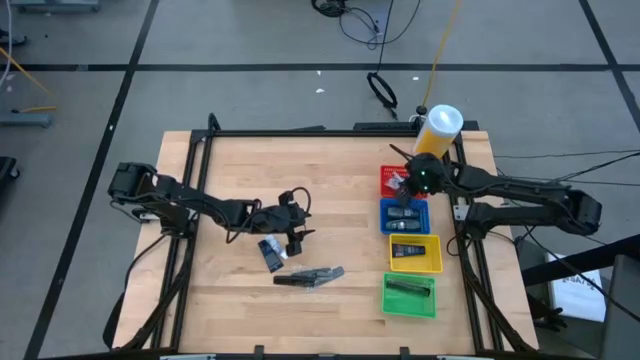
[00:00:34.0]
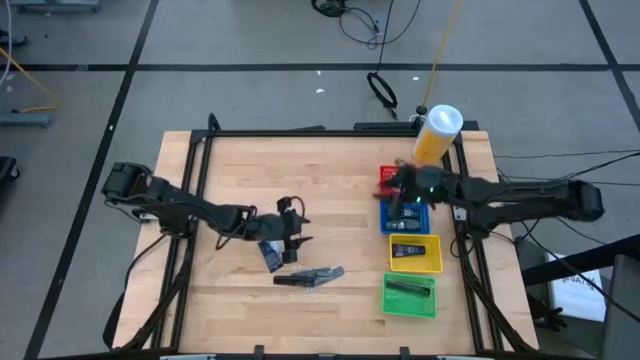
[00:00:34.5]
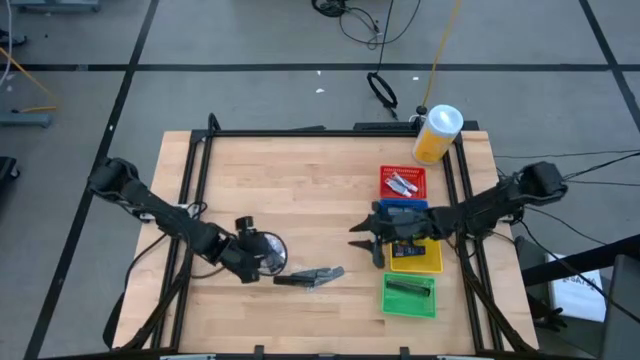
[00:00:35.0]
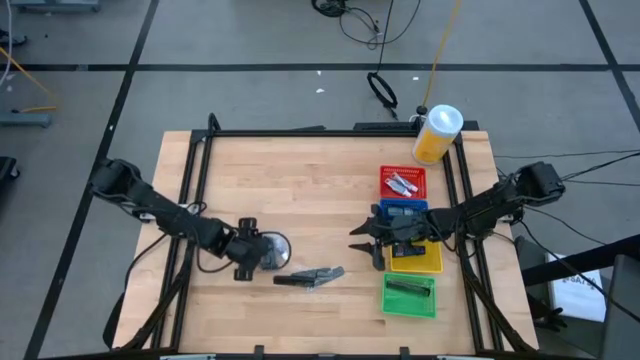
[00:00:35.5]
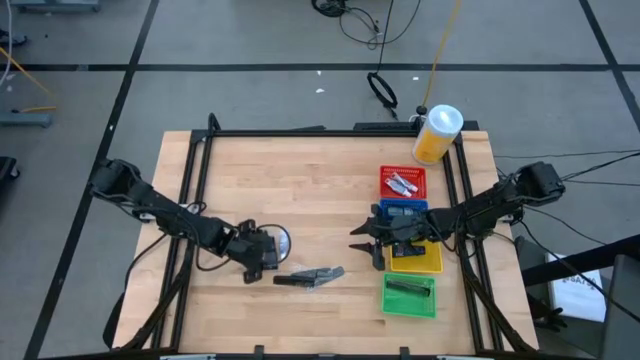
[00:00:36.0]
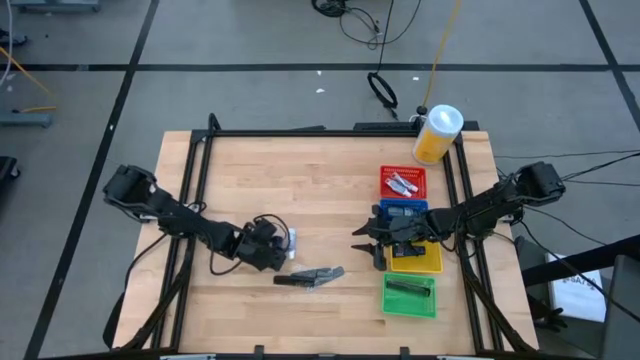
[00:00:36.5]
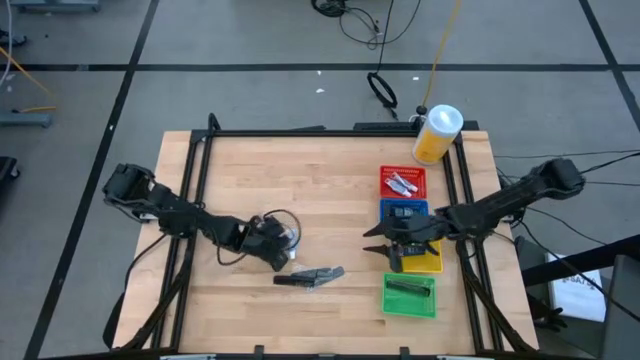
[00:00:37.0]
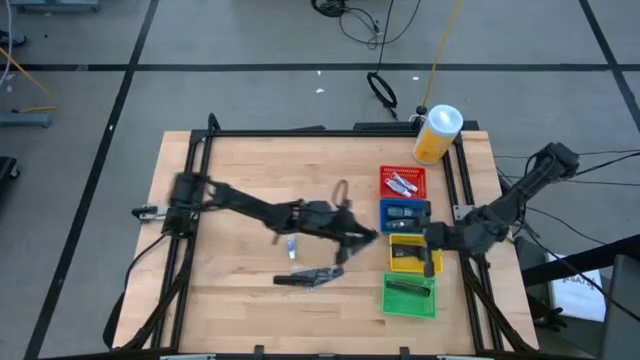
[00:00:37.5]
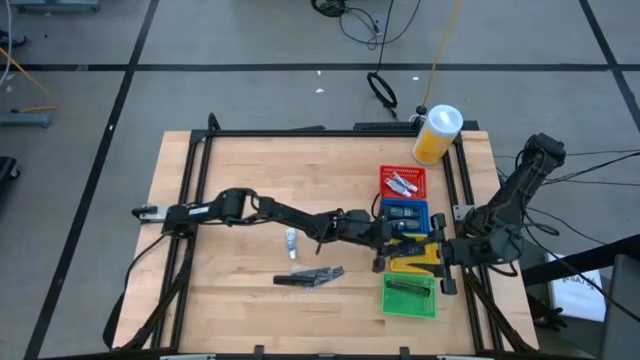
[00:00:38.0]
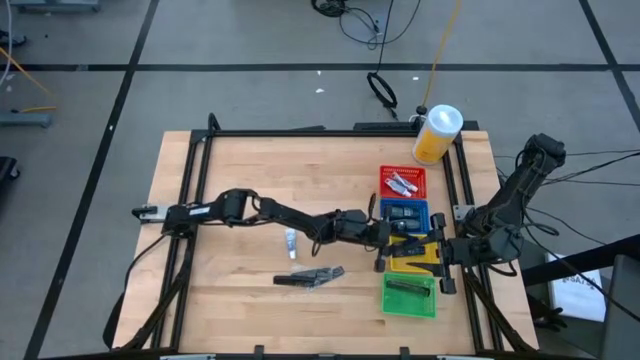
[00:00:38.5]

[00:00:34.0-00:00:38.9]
Task: Pick & Place Travel size toiletries
Put the black shaving cream into the yellow bin

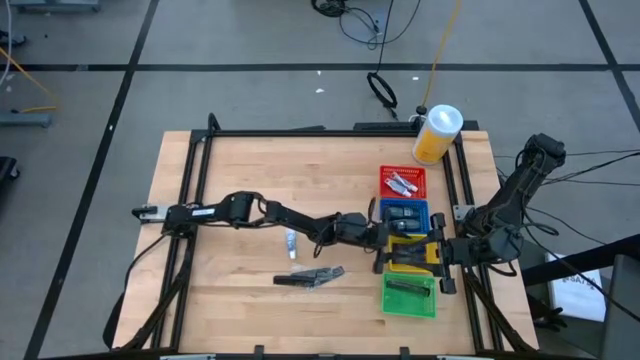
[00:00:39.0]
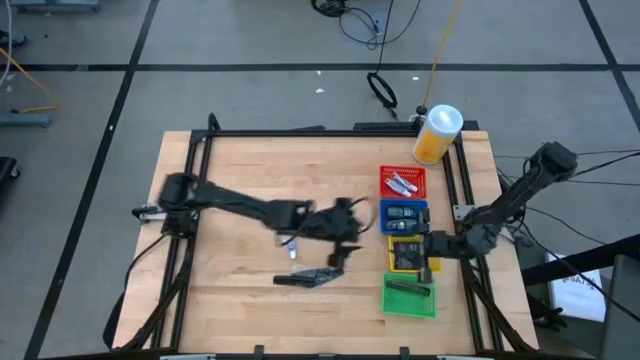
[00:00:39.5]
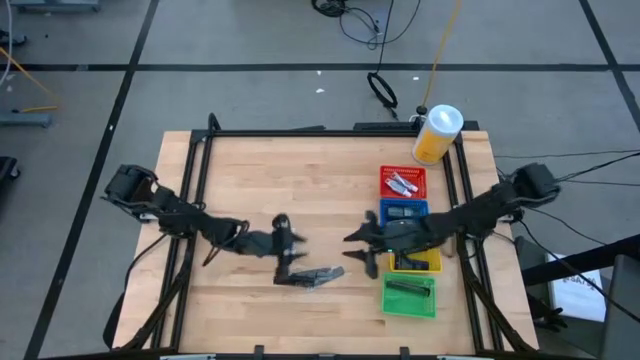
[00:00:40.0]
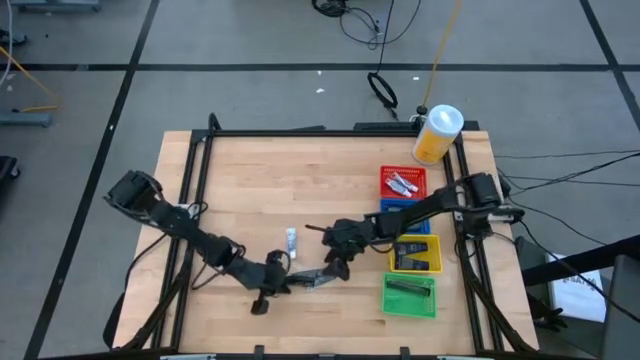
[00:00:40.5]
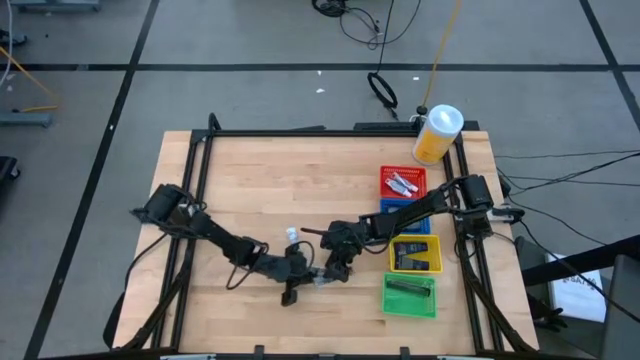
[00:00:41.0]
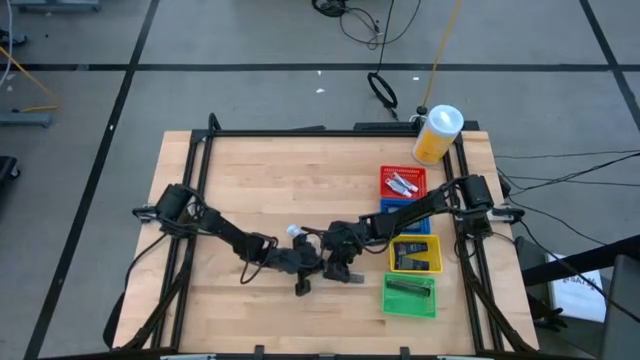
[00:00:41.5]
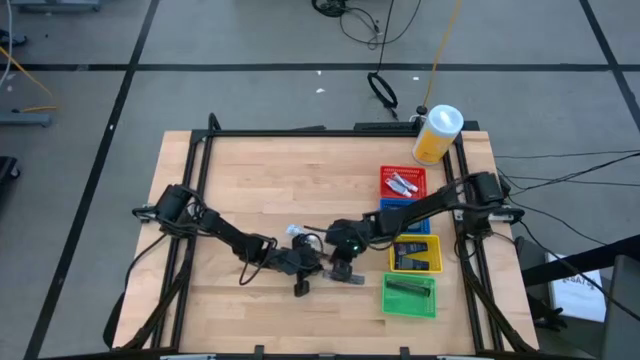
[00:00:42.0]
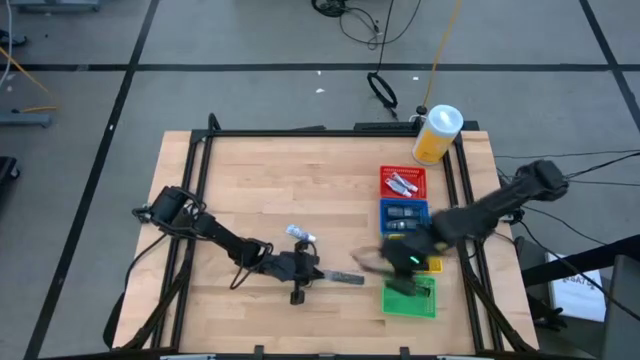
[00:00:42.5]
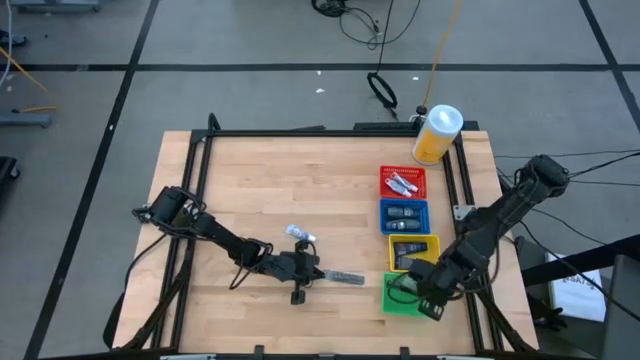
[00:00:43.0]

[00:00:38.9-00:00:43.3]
Put the black comb into the green bin

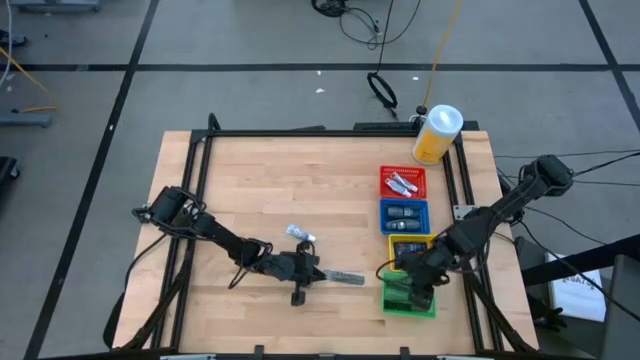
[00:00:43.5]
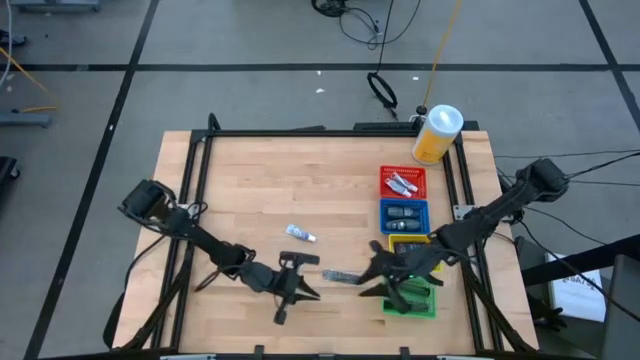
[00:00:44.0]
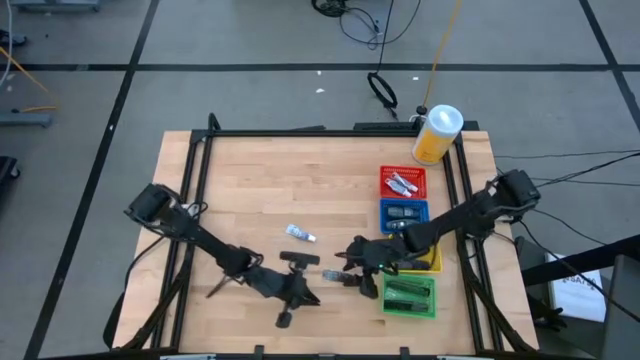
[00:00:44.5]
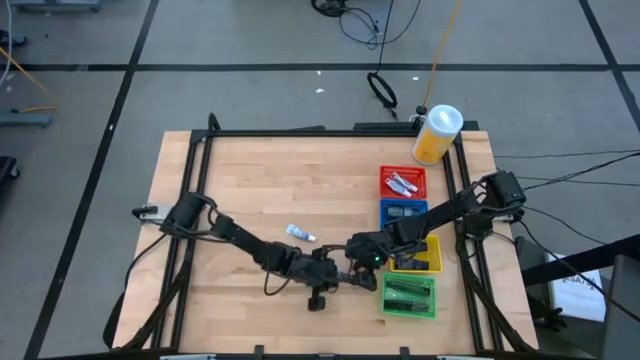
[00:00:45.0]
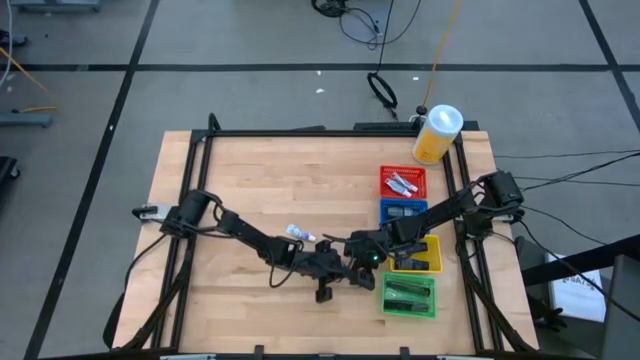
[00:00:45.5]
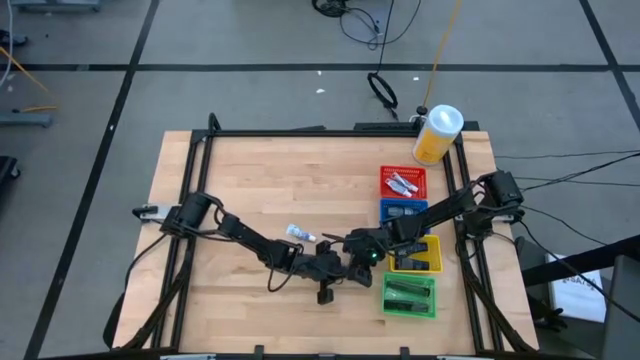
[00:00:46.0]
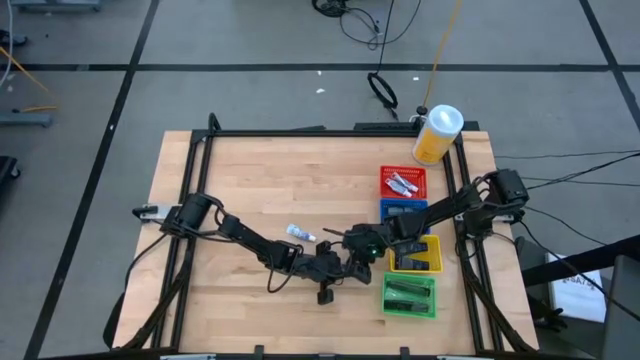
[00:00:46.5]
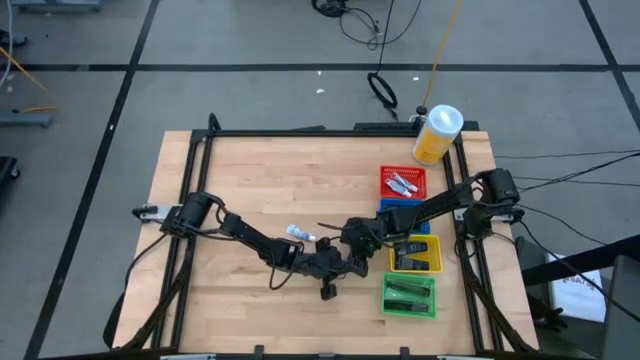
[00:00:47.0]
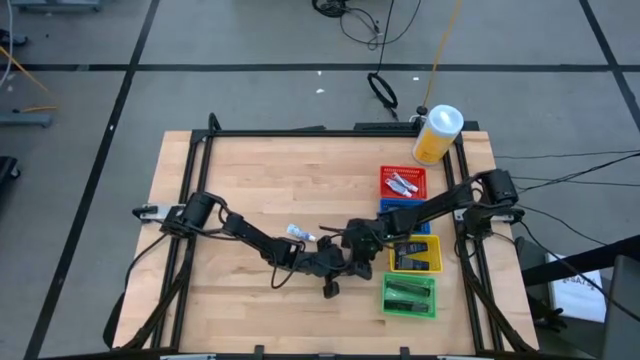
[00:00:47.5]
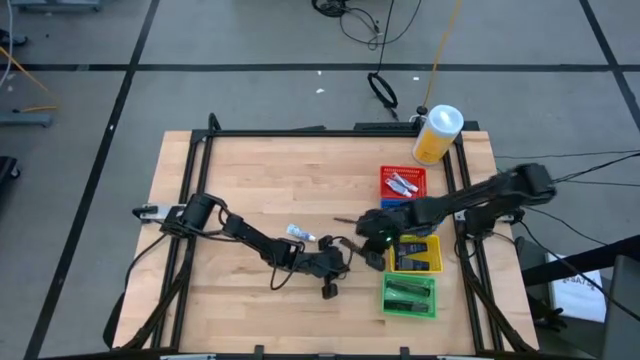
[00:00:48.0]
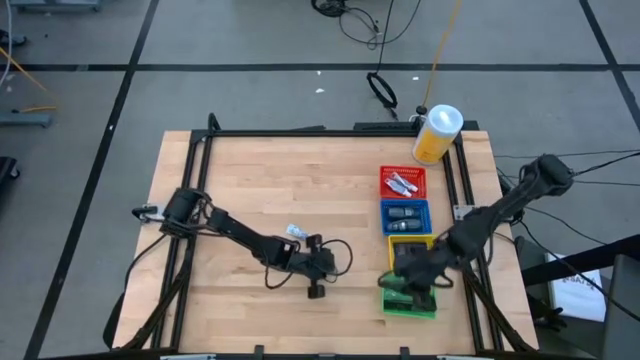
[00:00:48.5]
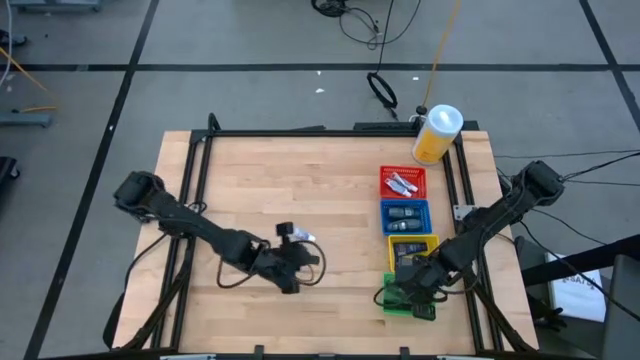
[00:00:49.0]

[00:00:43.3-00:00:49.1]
Put the black comb into the green bin

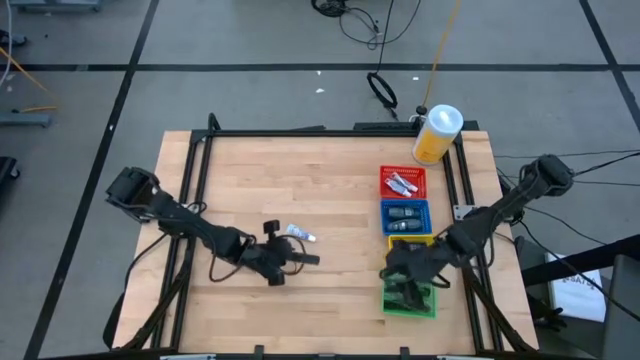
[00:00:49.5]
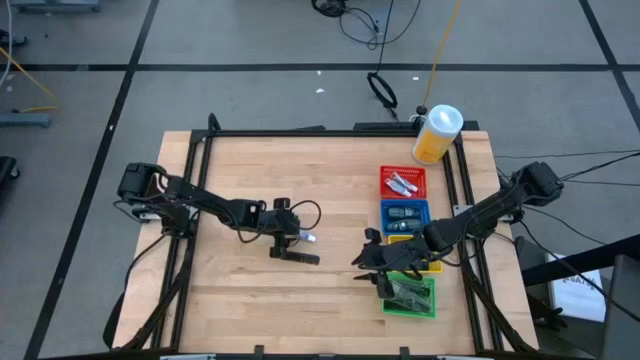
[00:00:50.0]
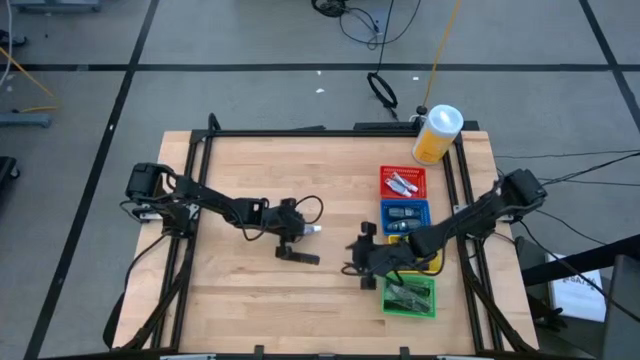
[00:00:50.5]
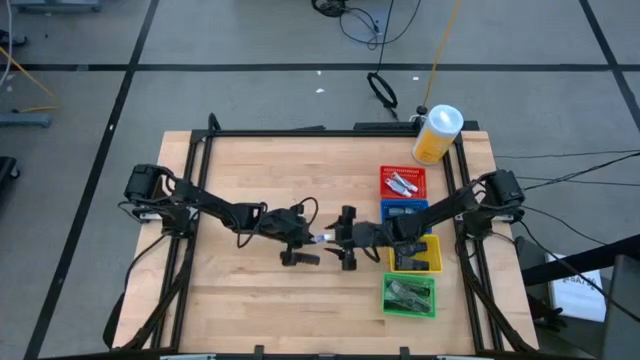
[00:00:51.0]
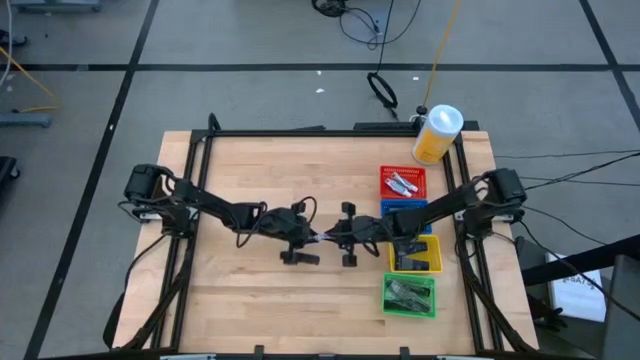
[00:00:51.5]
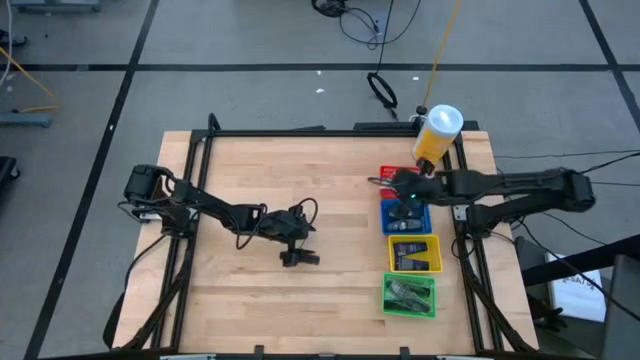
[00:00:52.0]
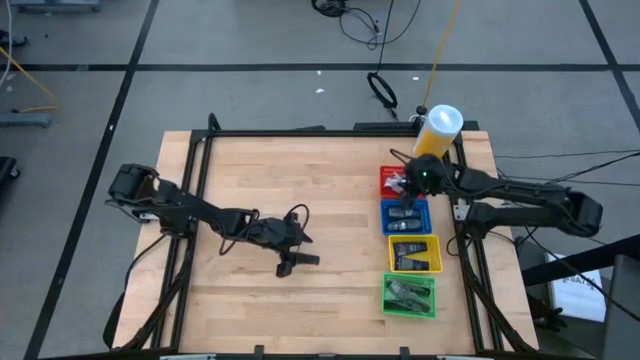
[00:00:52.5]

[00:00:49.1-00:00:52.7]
Put the white toothpaste into the red bin

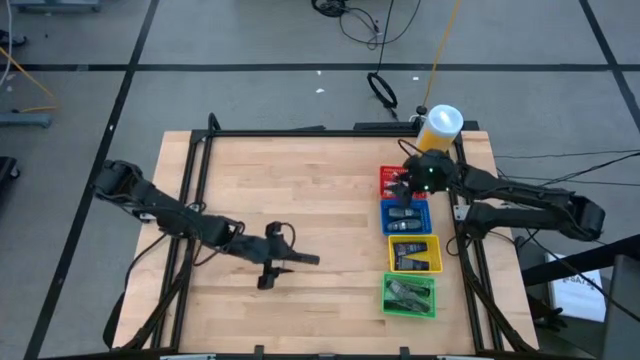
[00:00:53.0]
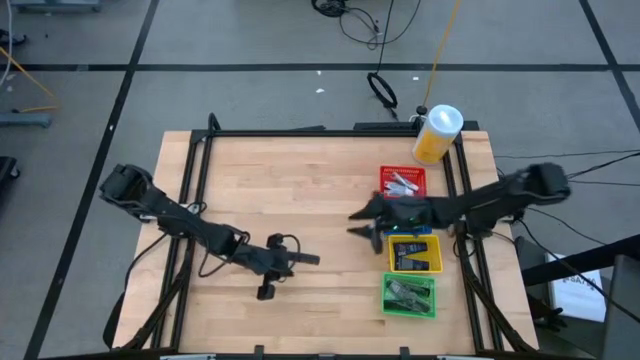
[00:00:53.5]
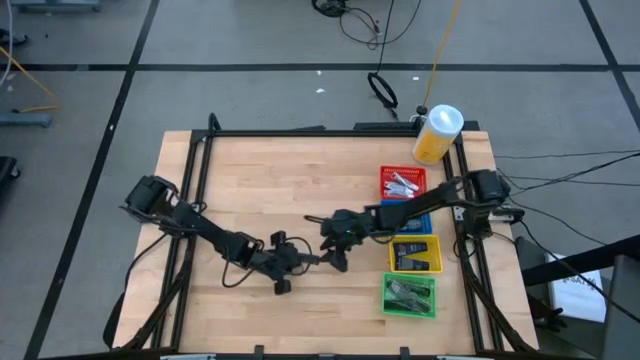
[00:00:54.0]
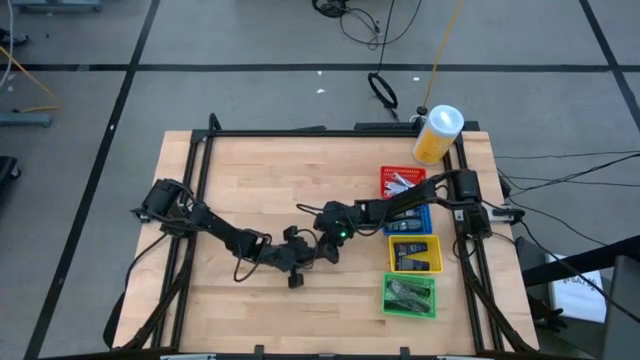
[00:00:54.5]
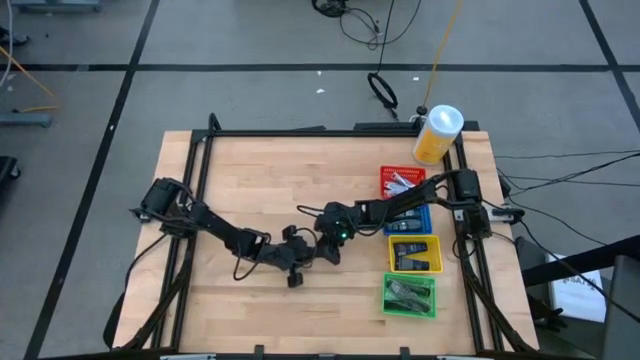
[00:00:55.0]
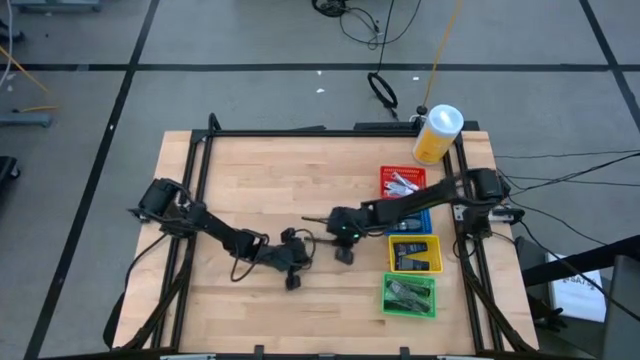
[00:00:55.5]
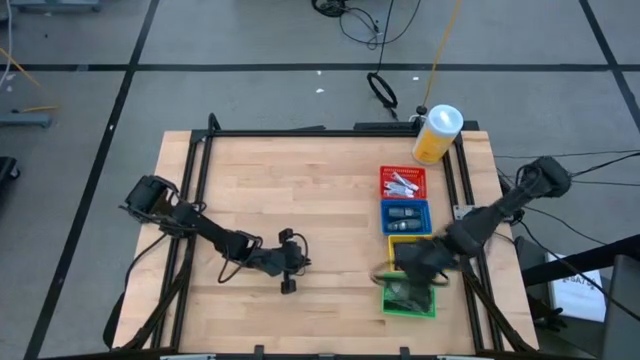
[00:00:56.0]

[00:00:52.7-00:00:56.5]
Put the black comb into the green bin
